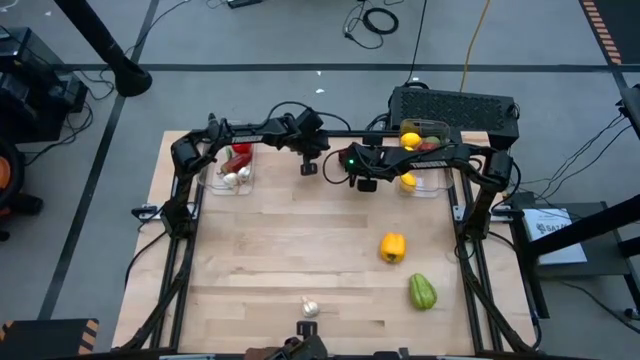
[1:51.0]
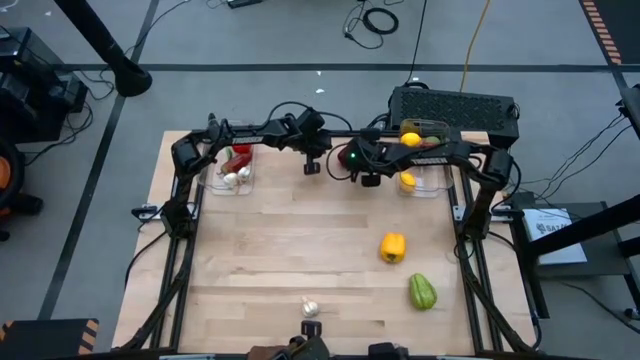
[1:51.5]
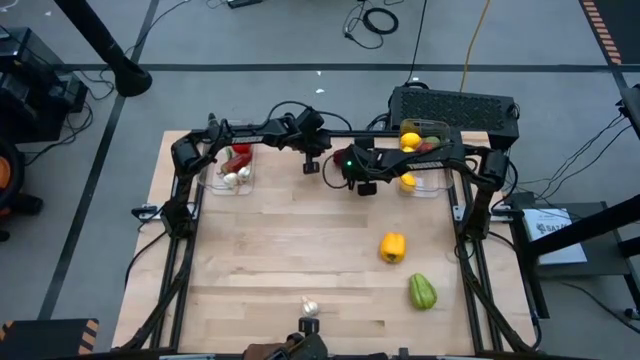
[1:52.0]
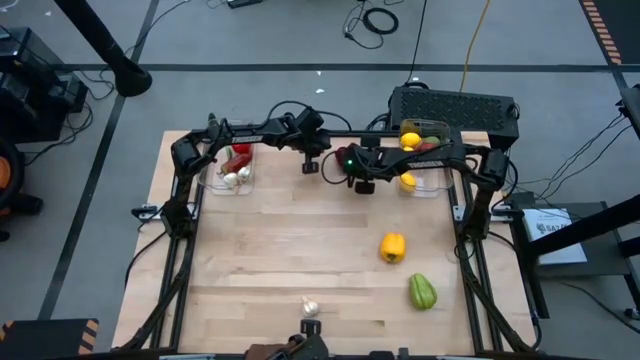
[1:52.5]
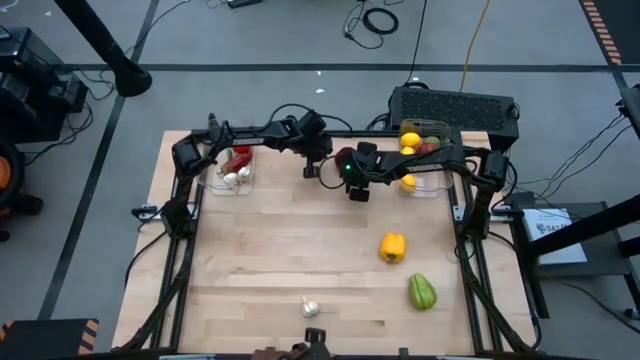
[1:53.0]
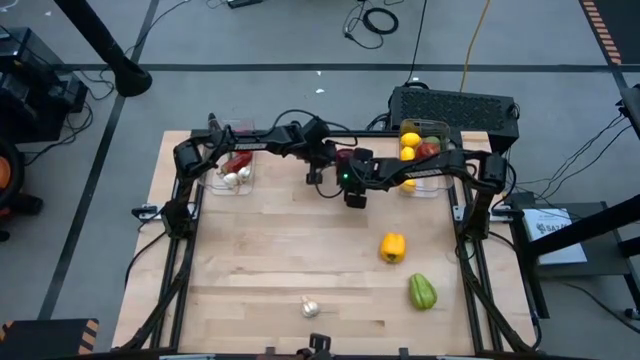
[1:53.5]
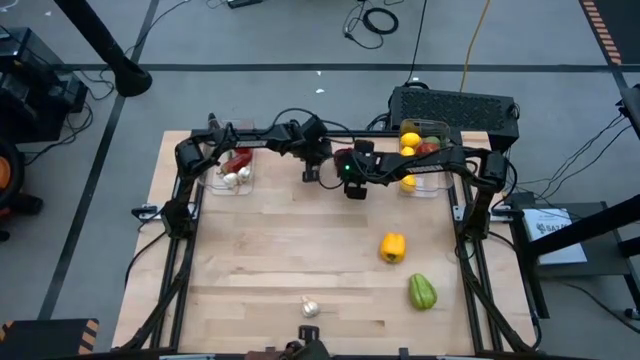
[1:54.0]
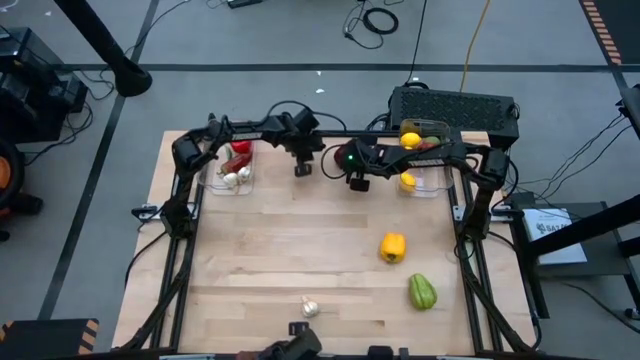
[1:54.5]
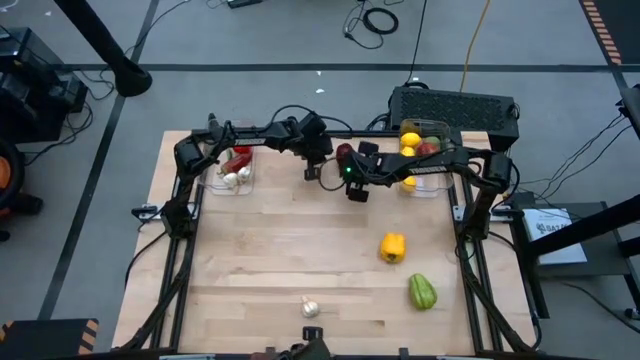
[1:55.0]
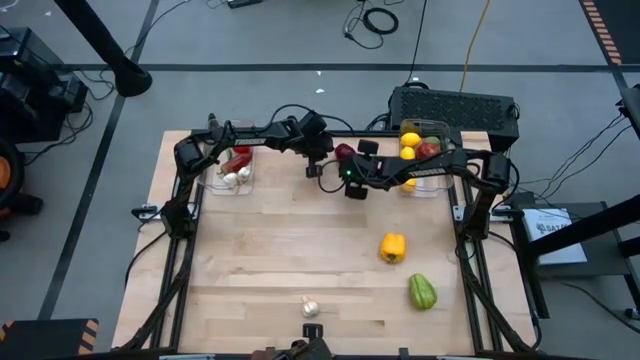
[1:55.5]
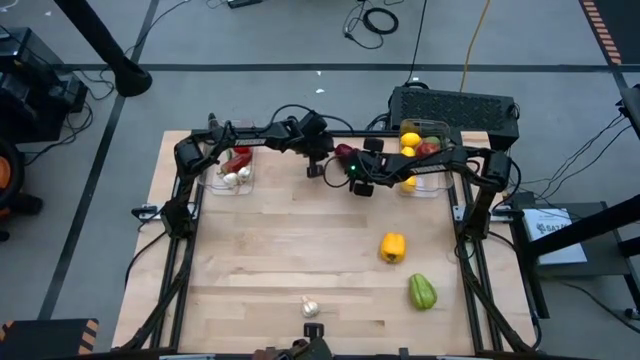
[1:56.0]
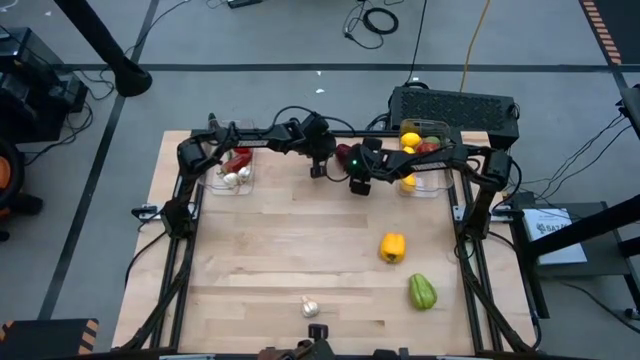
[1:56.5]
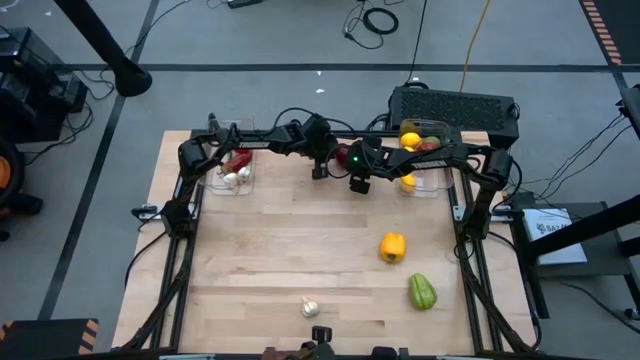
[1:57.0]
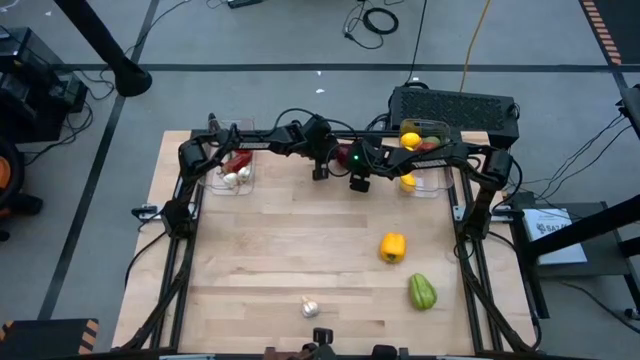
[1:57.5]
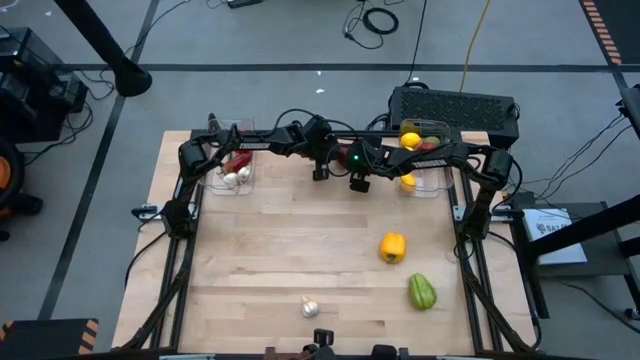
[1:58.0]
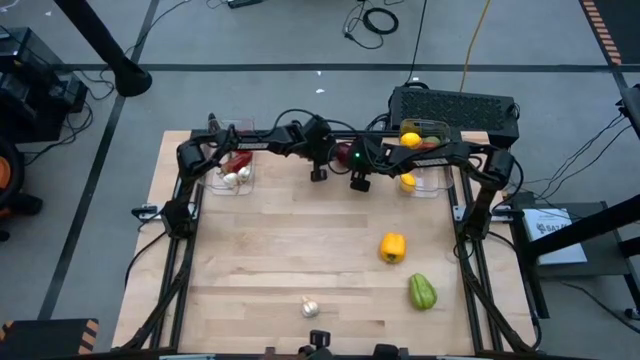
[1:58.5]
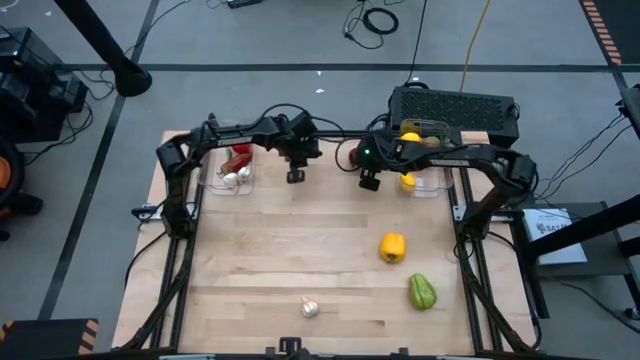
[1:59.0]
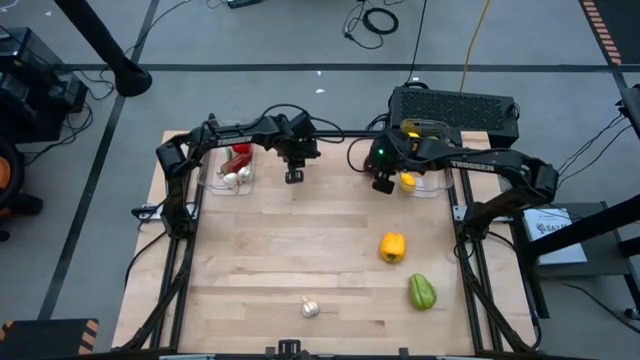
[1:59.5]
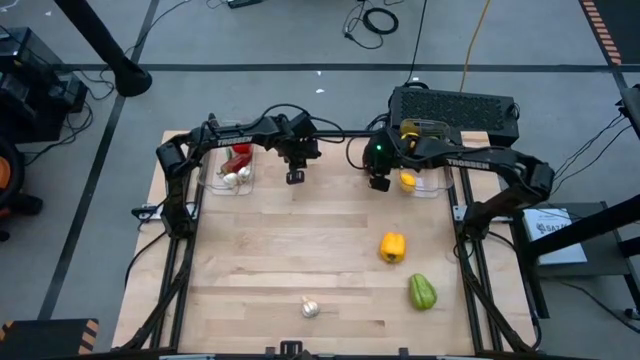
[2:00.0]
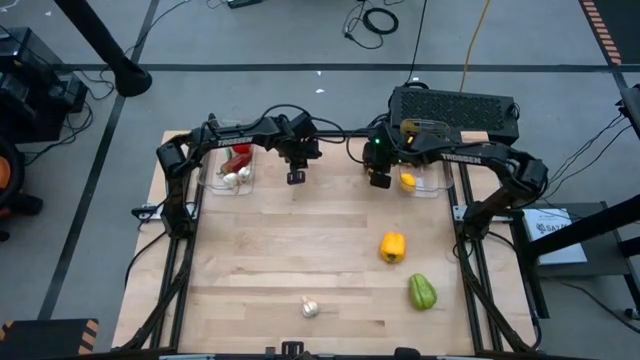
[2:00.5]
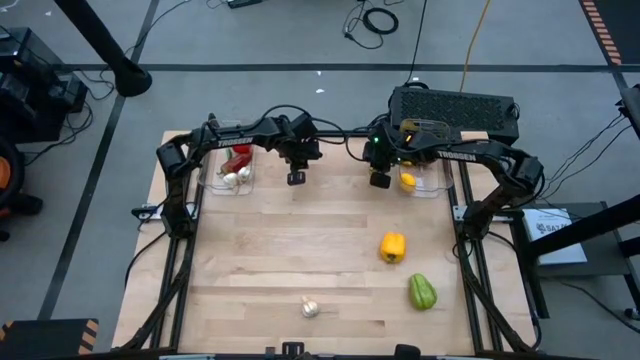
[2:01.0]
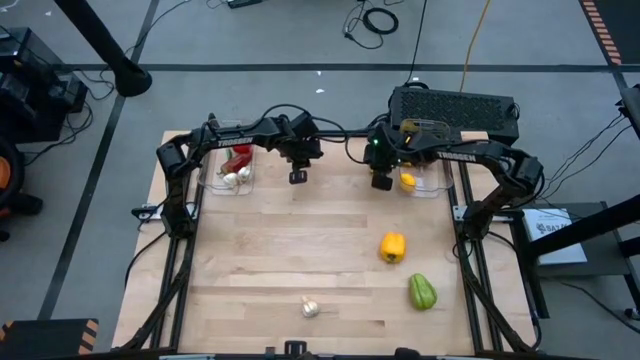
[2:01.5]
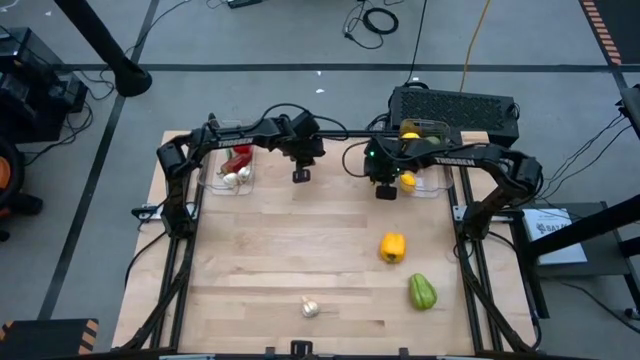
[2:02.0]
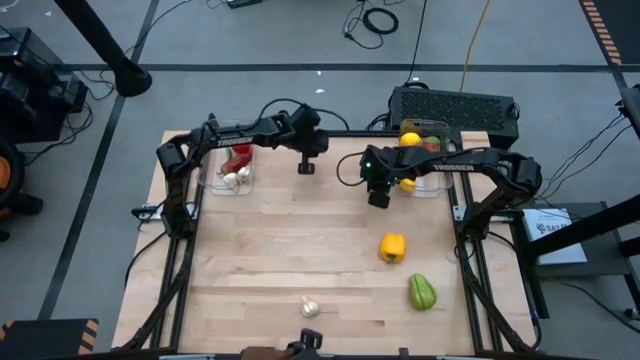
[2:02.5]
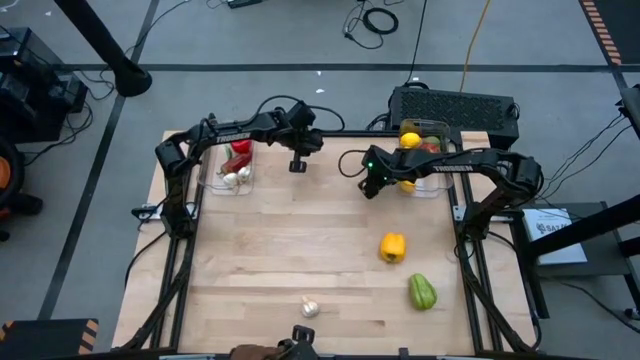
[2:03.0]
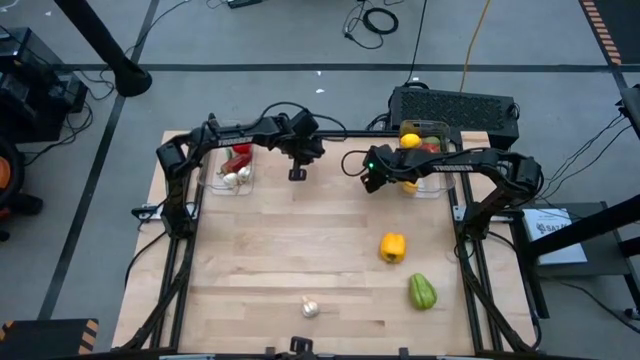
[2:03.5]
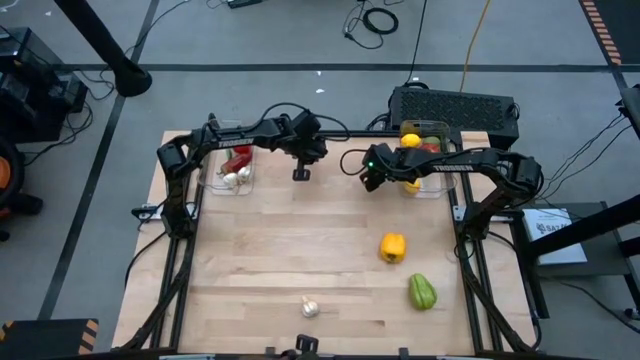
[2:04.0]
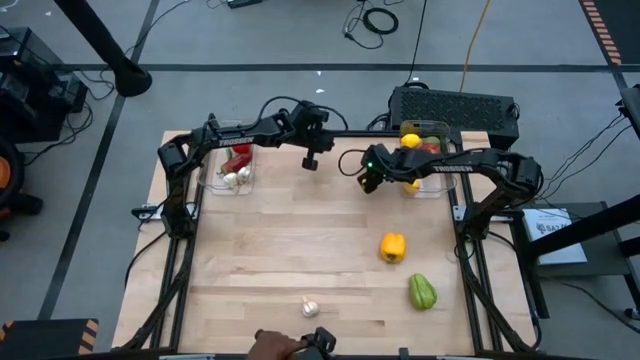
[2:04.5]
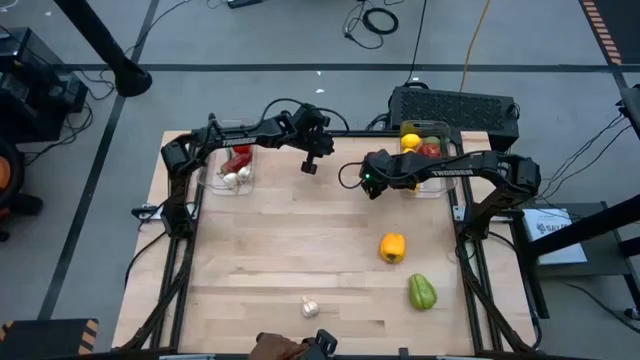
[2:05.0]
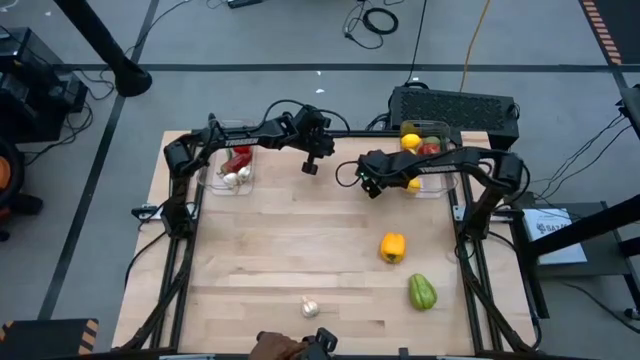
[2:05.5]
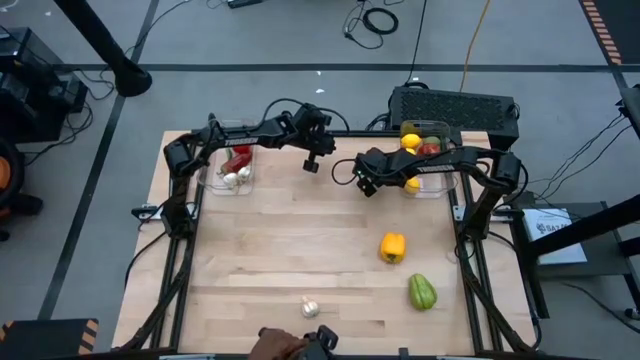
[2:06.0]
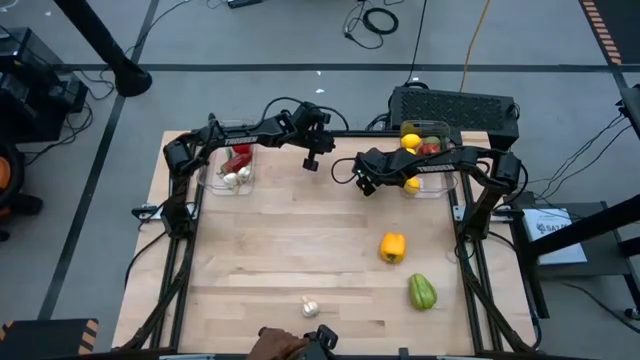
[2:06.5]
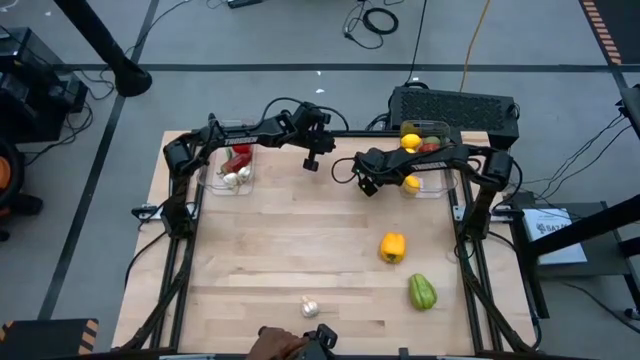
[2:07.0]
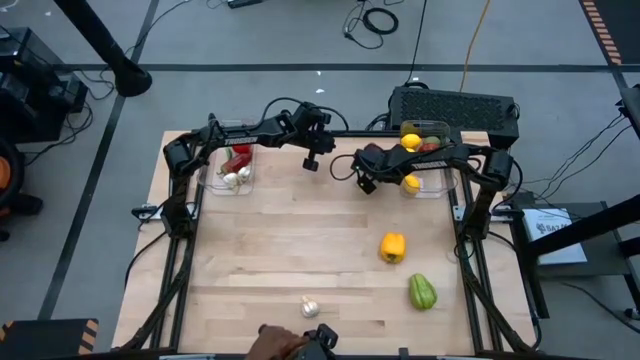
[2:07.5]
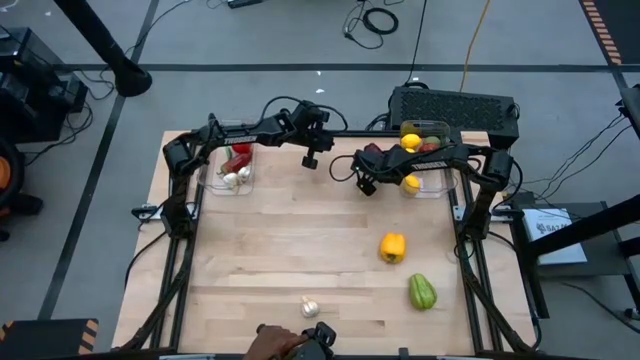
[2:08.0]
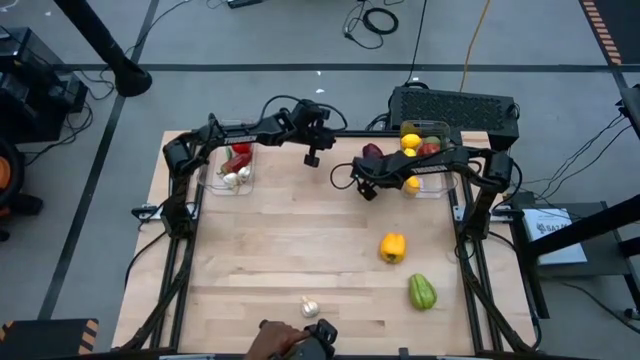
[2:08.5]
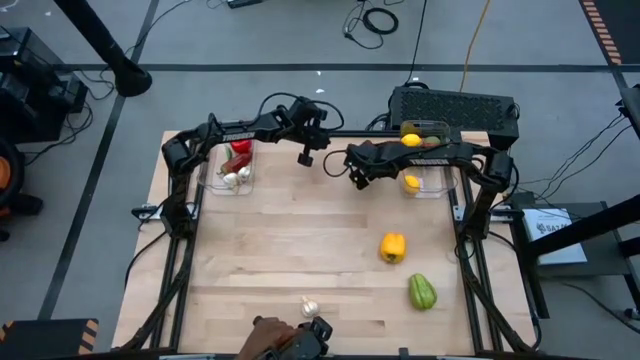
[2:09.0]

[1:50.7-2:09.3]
Task: Sort produce into baskets
Put the apple into the right transparent bin

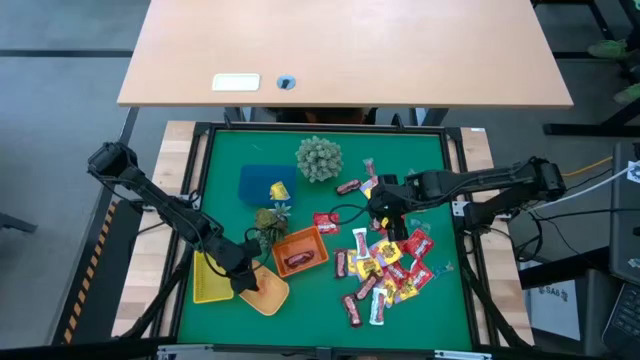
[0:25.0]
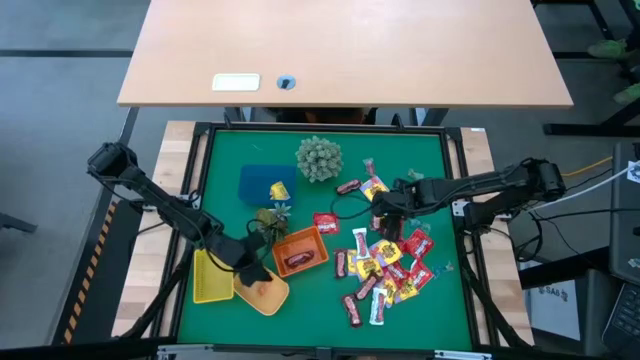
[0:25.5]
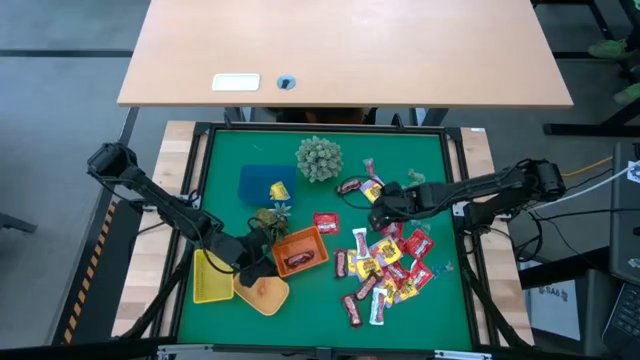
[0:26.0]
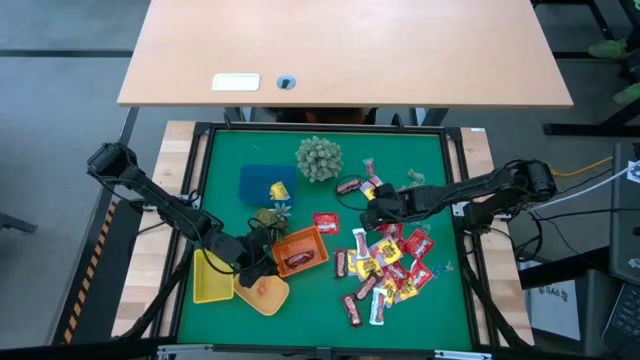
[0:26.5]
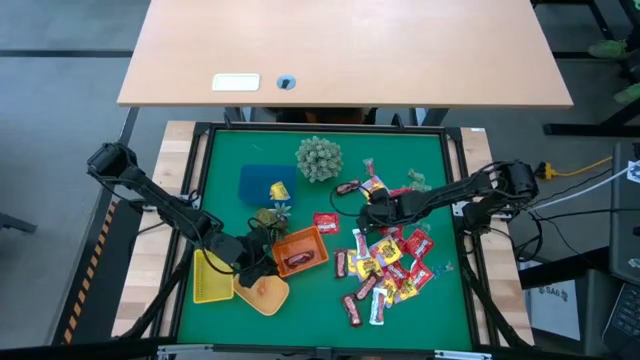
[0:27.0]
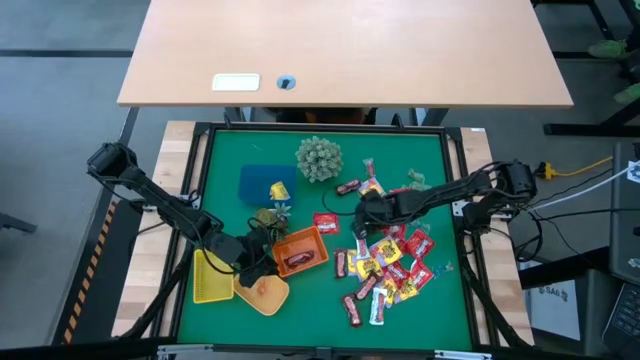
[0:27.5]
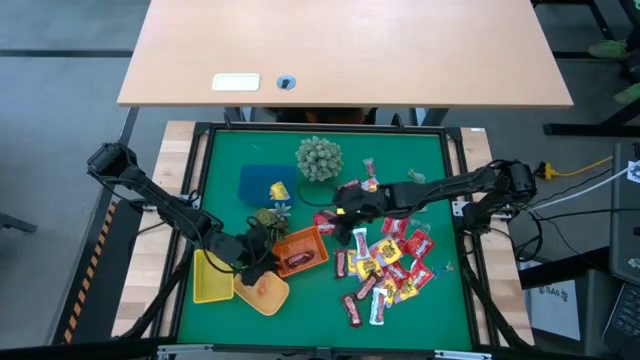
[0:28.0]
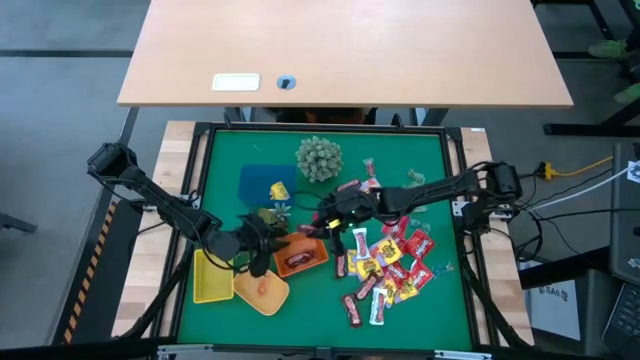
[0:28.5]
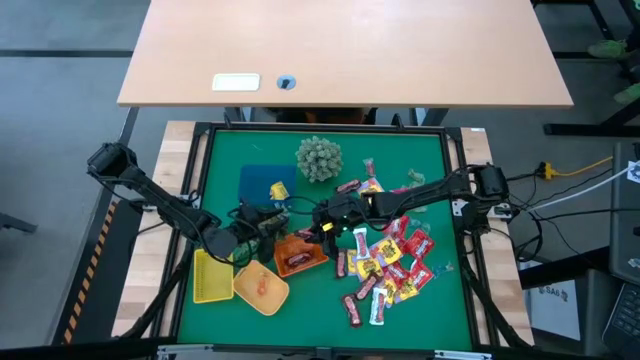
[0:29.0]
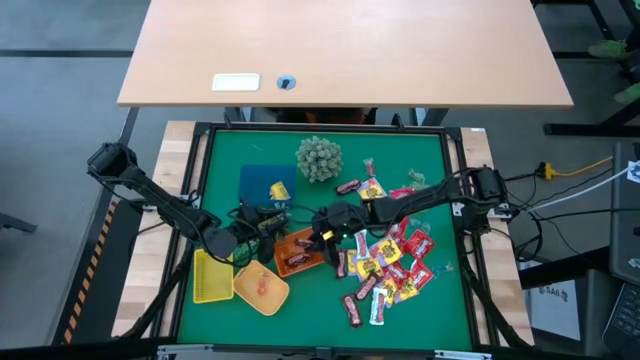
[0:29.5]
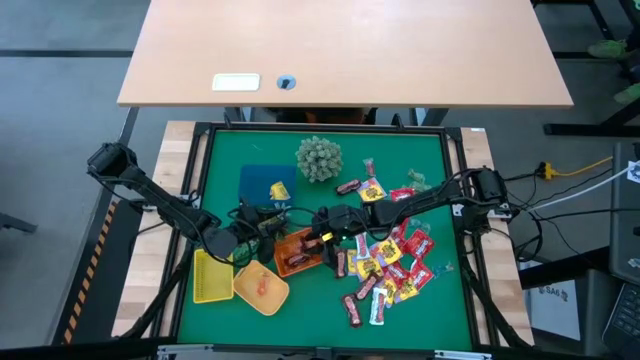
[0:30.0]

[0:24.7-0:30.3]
Task: Sort candy
Put the brown chocolate into the orange bin
